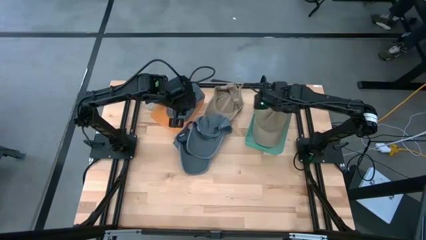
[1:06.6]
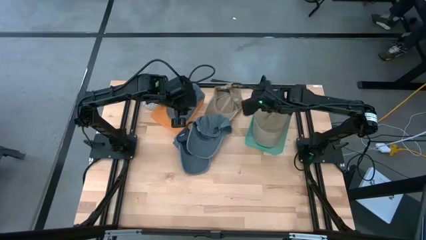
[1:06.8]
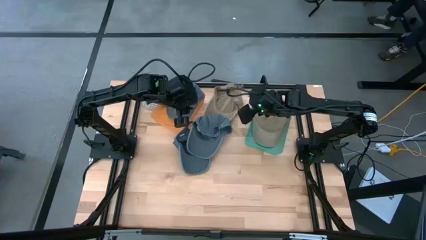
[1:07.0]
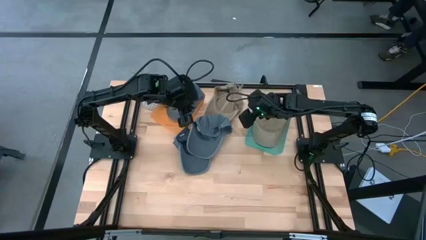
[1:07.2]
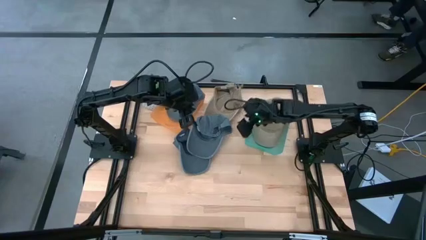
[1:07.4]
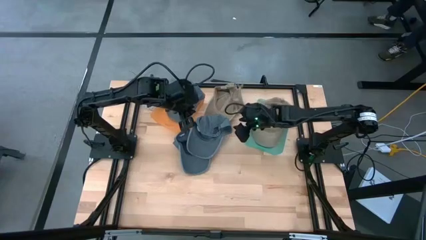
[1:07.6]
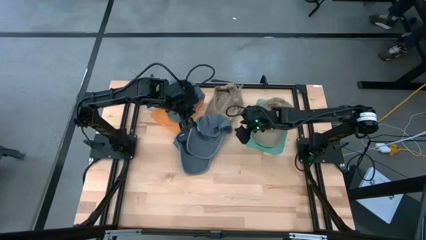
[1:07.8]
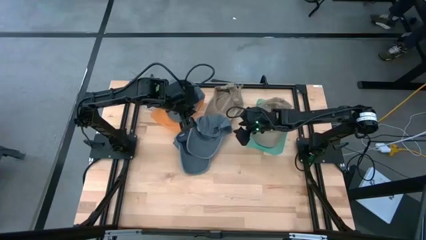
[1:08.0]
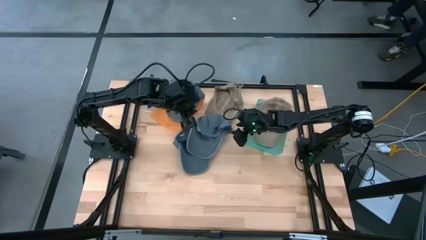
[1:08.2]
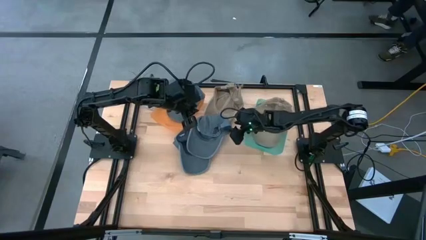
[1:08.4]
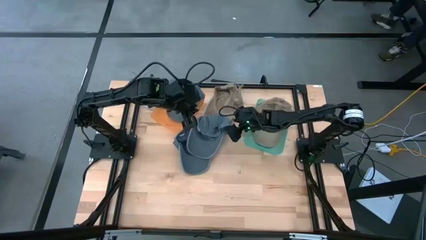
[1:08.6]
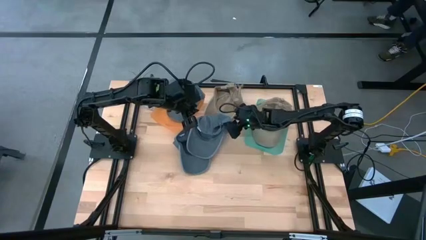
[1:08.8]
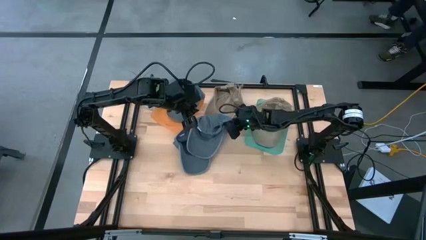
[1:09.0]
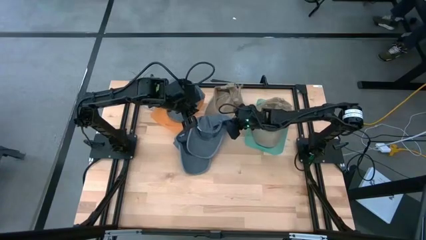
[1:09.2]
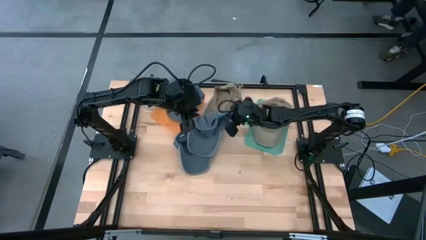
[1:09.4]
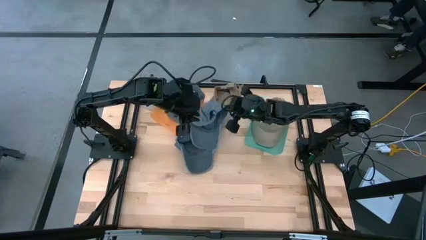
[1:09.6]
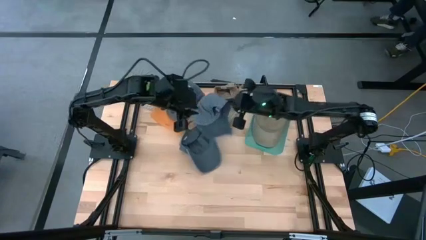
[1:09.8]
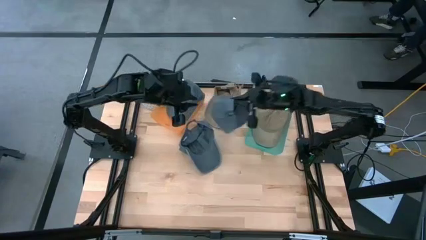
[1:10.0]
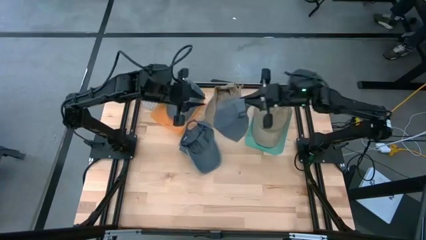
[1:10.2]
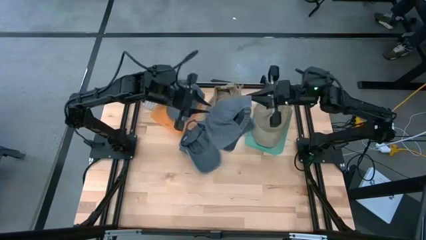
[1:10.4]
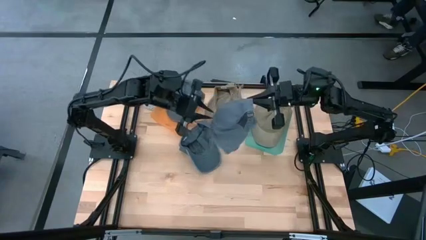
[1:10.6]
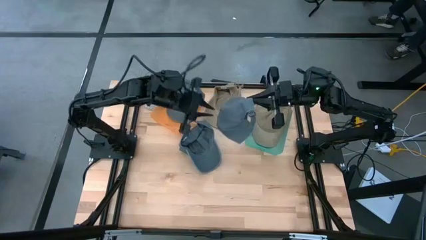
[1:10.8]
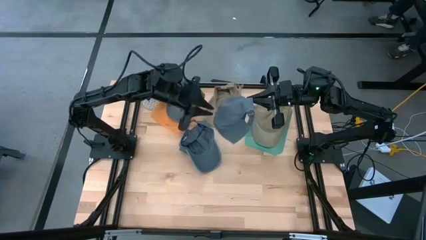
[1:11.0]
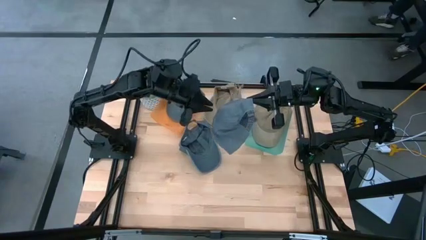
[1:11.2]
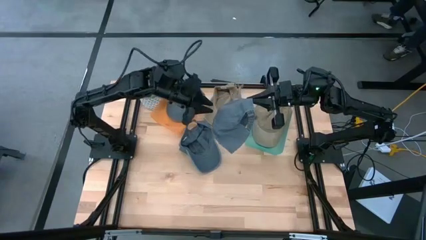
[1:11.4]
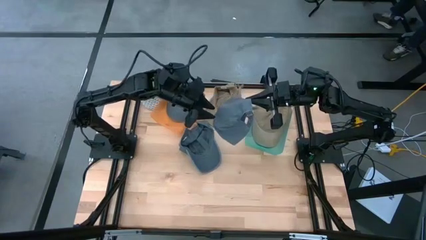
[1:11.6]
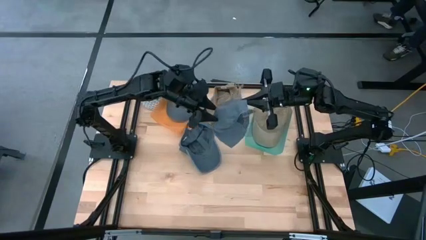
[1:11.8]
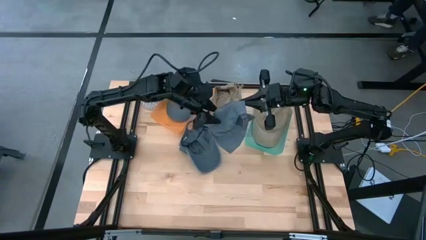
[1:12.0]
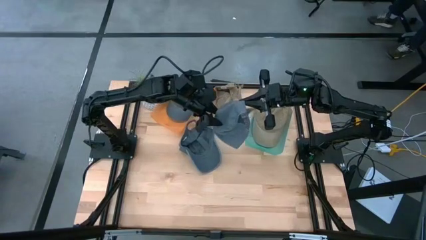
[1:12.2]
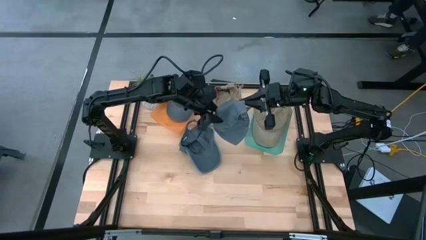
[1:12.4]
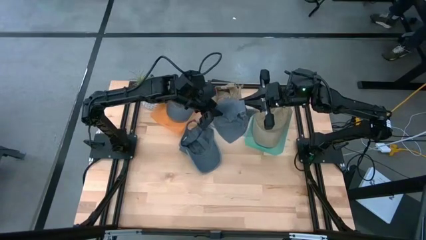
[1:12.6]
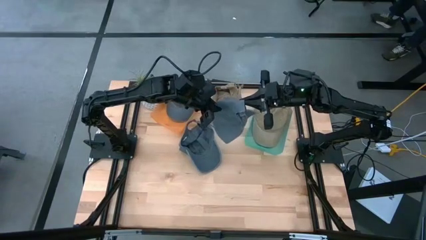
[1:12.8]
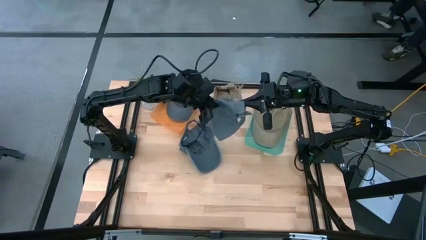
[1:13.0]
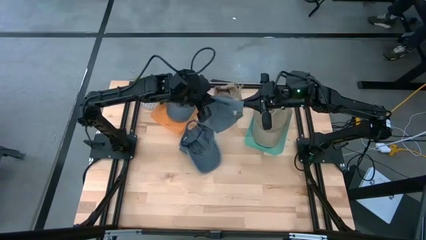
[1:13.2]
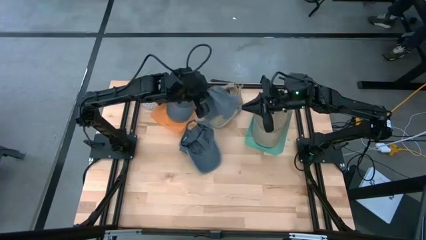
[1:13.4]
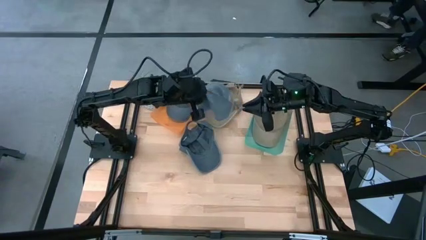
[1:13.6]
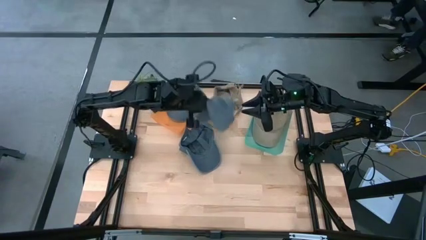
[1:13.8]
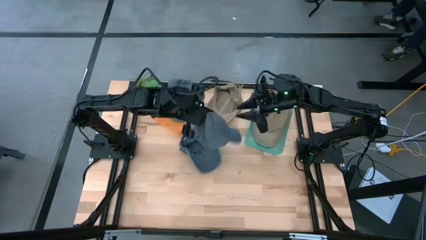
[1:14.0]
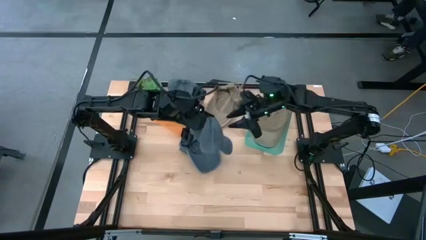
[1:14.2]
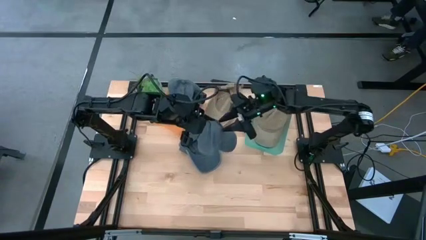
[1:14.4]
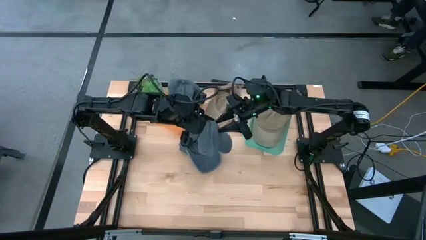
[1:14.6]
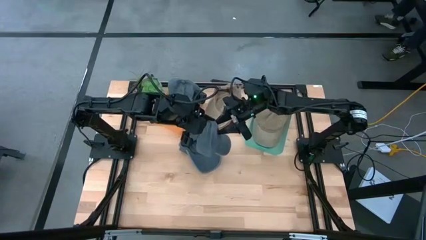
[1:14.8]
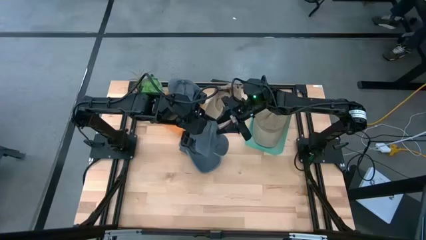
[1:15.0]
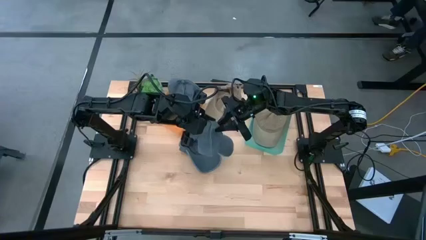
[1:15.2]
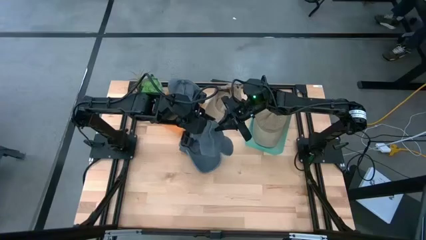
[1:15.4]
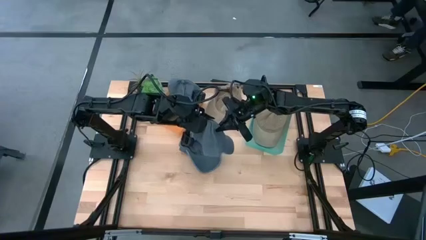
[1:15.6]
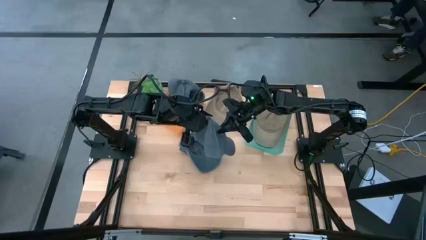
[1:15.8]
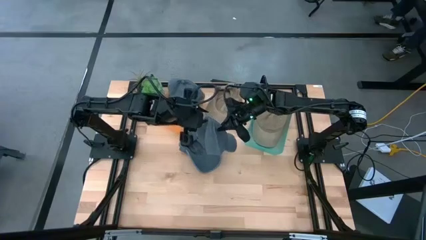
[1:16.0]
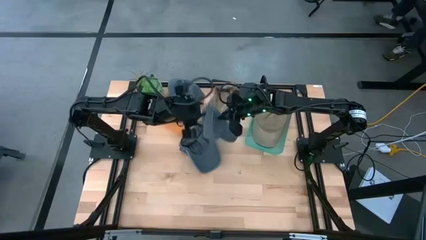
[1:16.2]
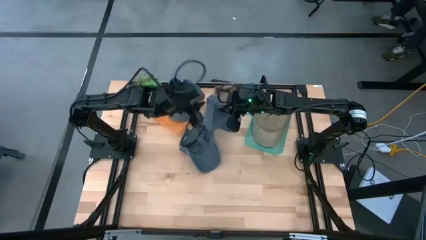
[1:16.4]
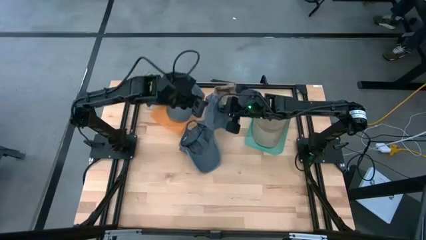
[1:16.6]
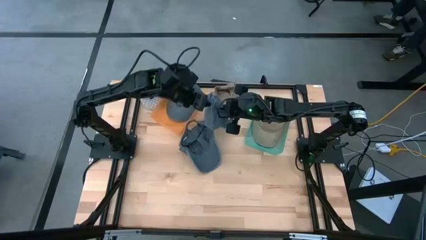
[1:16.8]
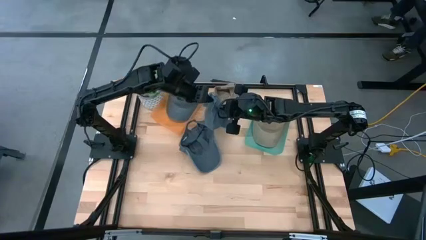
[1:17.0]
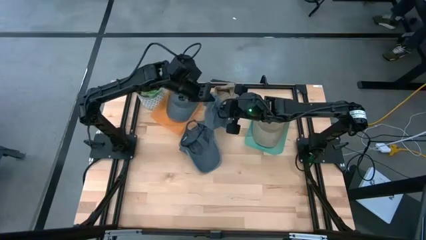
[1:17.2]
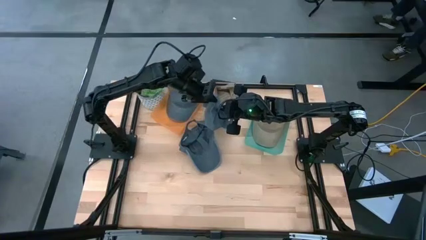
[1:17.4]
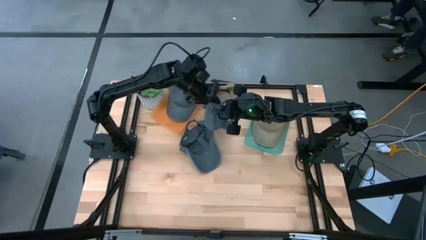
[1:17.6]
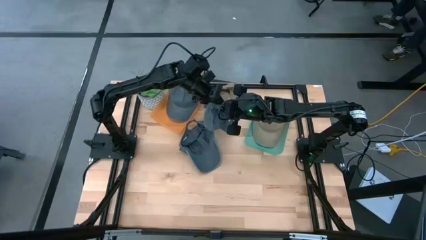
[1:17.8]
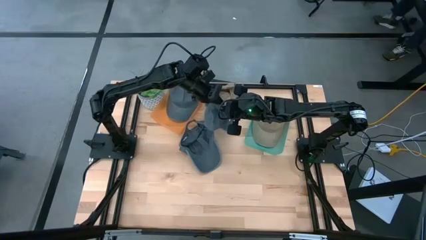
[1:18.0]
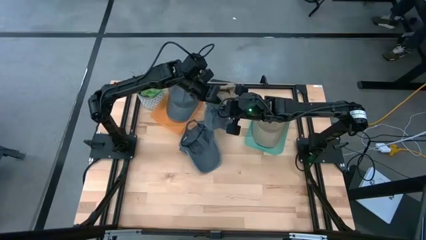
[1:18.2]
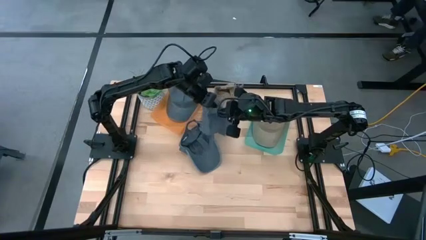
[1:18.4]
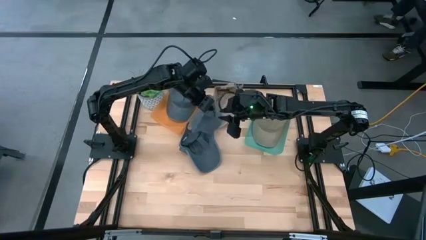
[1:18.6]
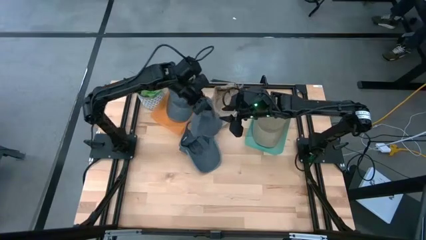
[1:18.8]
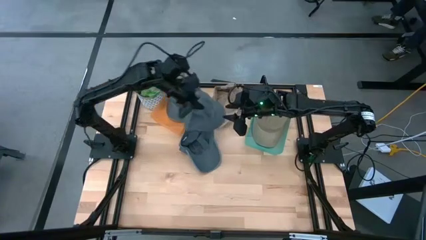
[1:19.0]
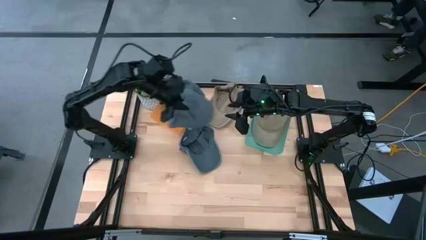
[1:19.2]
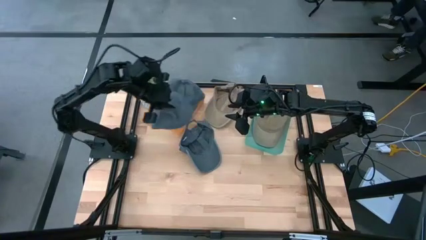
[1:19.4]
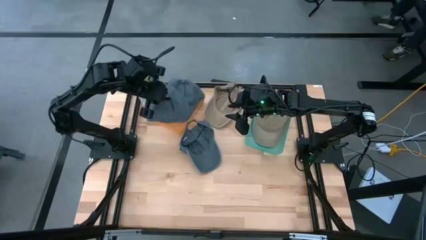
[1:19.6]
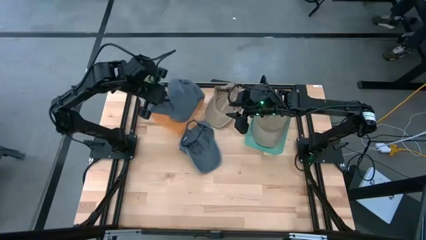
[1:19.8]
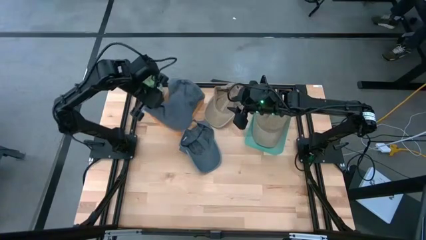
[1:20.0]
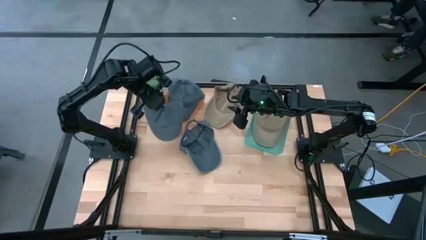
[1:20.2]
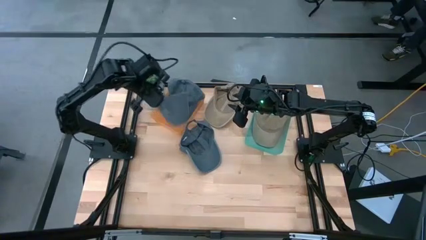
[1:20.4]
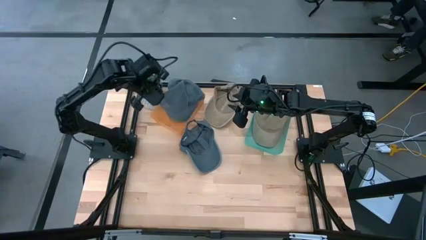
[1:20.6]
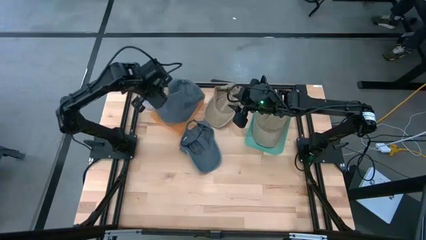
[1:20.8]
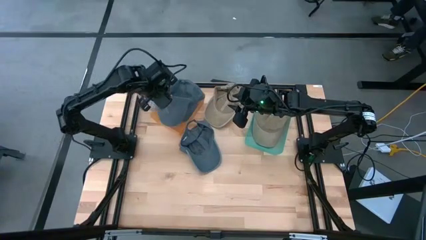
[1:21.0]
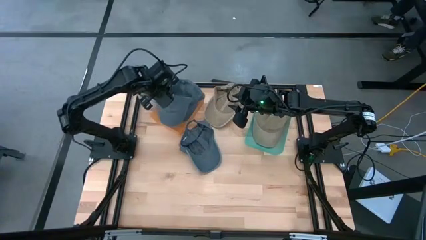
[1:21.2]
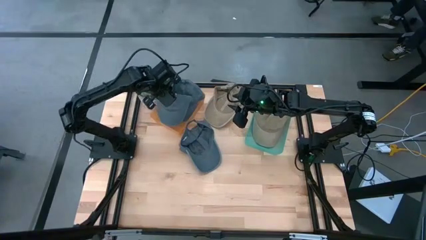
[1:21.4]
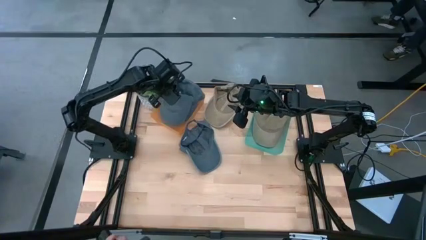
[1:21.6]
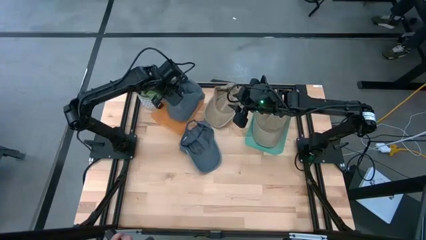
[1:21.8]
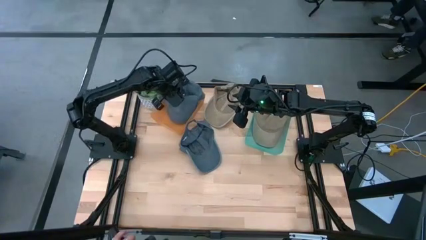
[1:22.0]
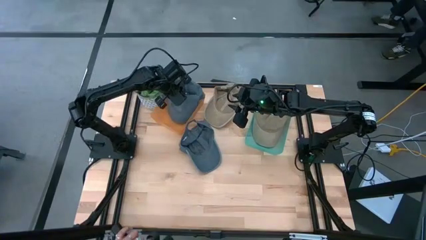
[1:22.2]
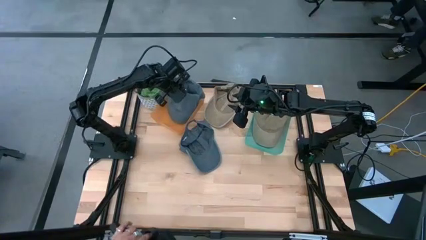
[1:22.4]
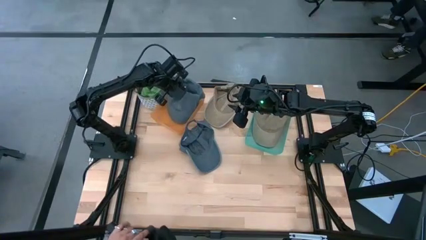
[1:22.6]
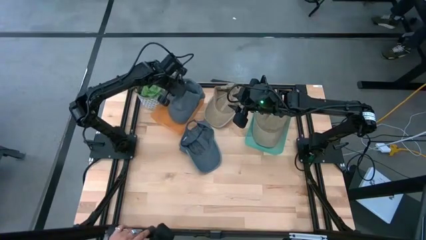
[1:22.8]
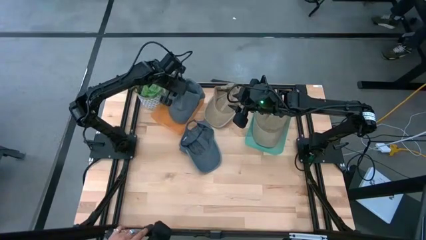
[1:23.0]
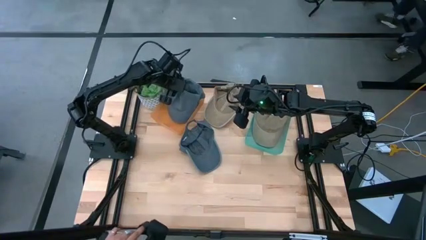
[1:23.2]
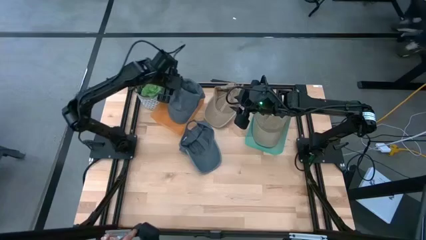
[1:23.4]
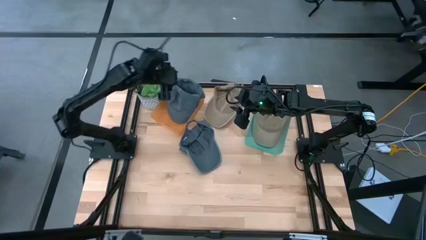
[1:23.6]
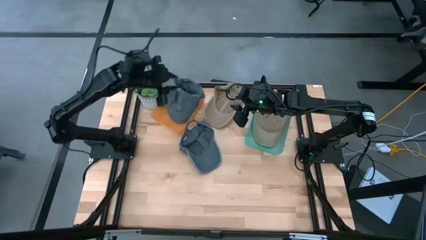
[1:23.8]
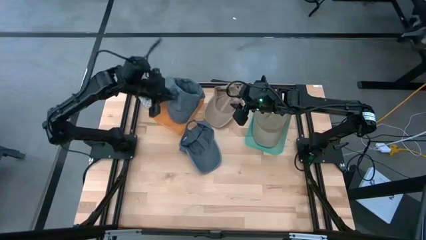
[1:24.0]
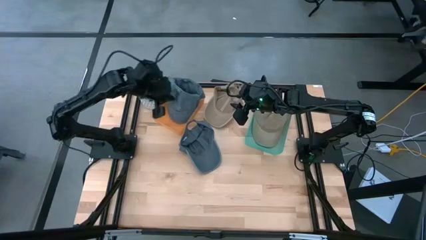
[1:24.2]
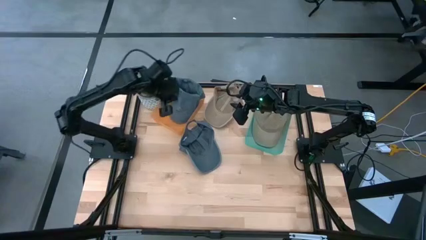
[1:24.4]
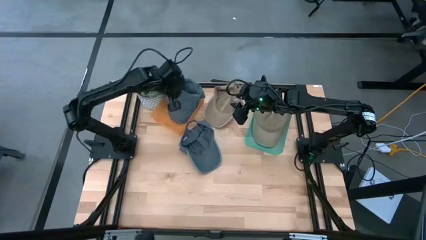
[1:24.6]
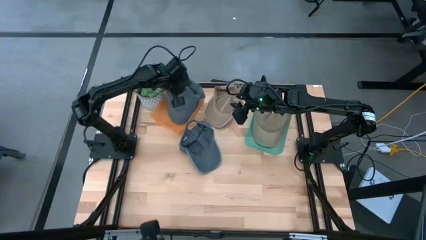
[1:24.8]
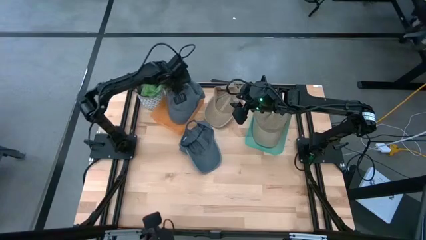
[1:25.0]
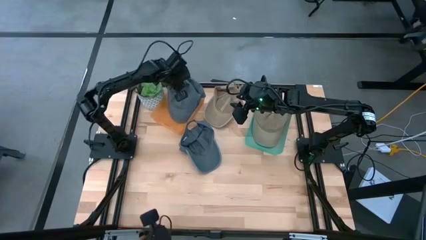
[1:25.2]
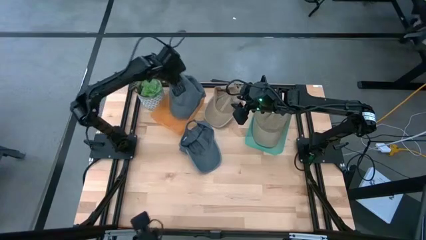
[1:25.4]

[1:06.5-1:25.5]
Task: Pick & Place hat
Put the gray cap into the orange bin
